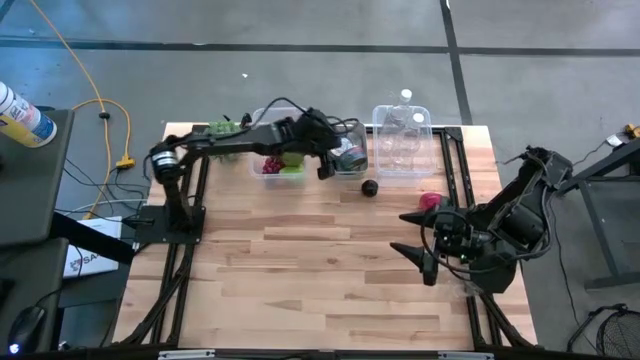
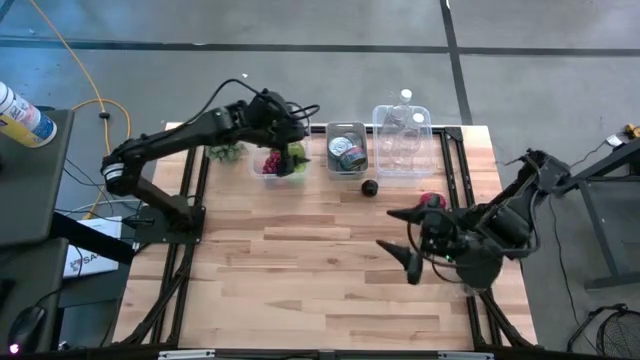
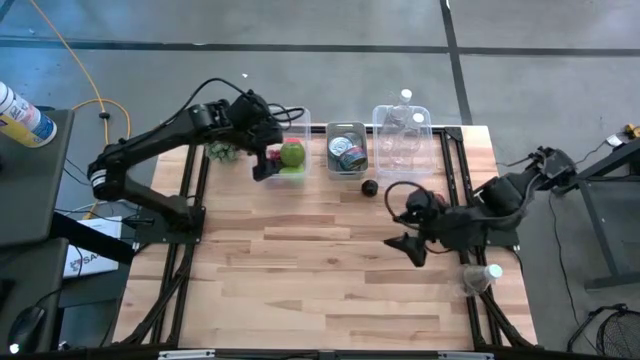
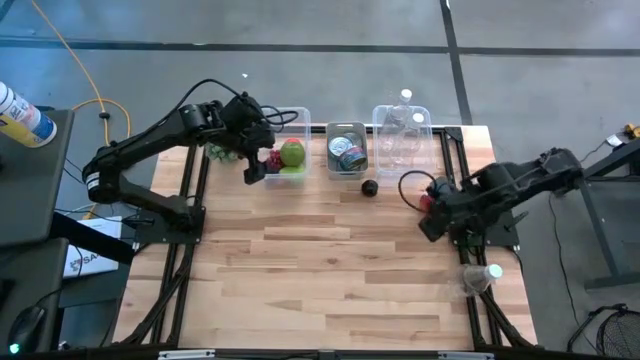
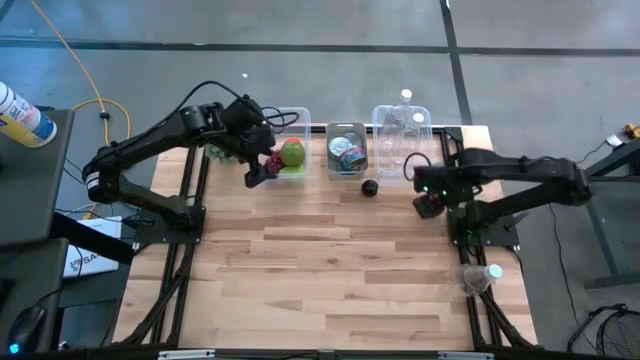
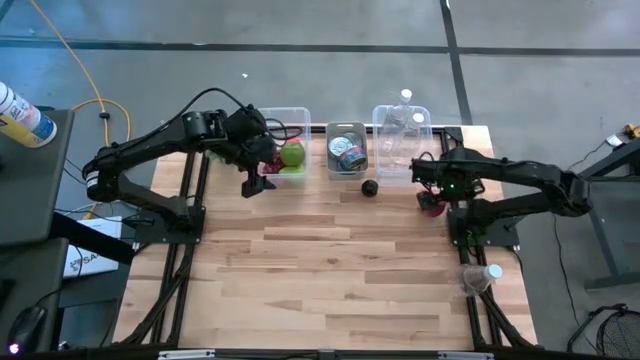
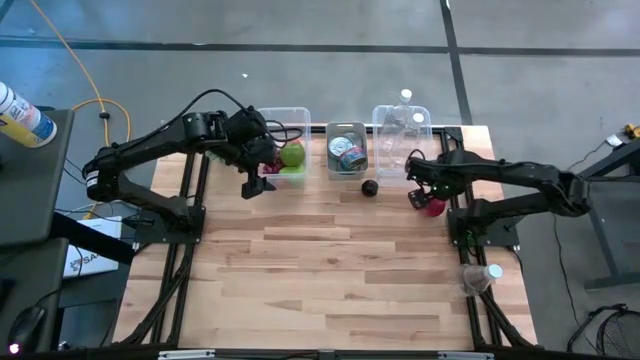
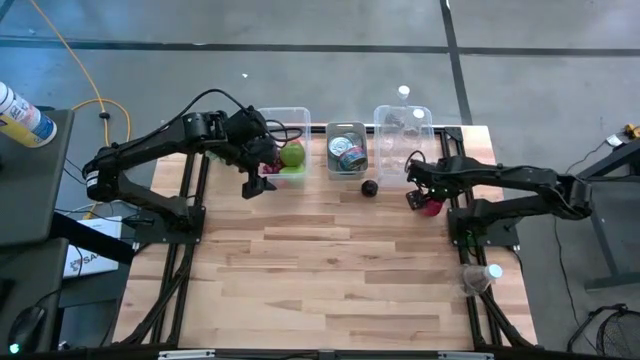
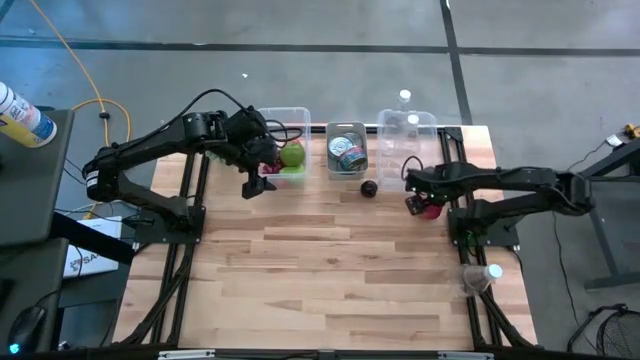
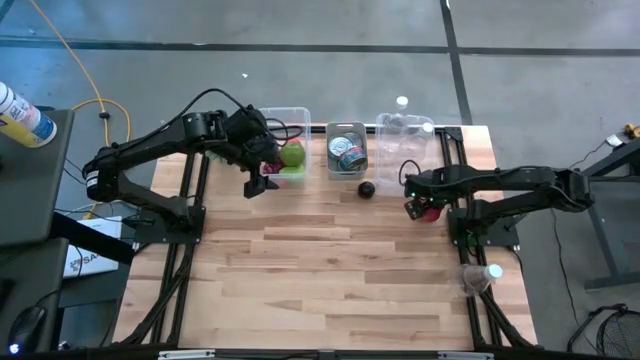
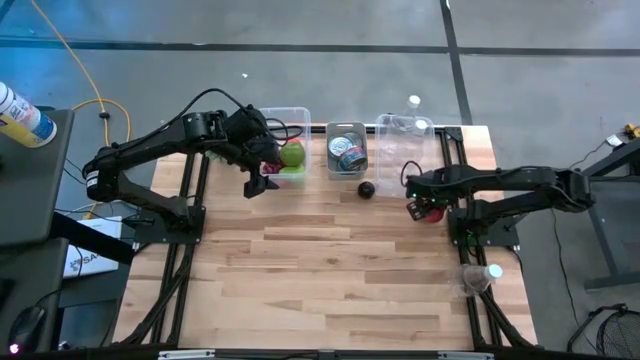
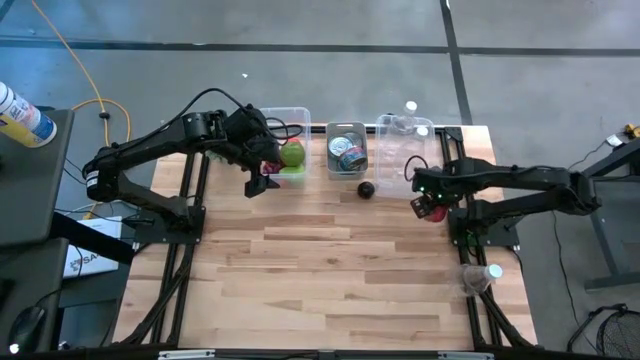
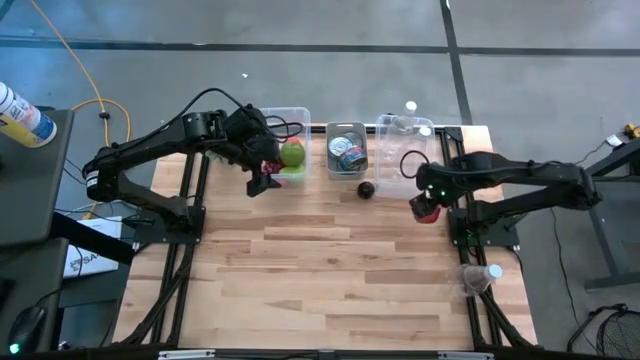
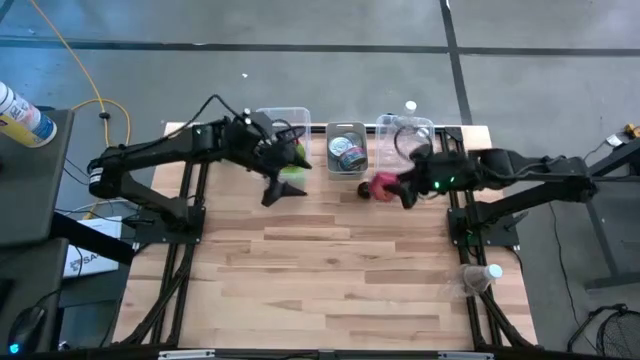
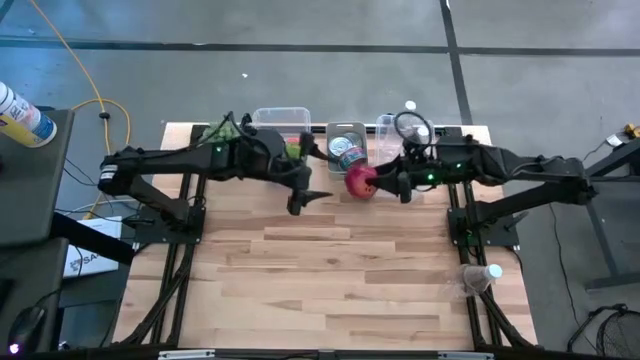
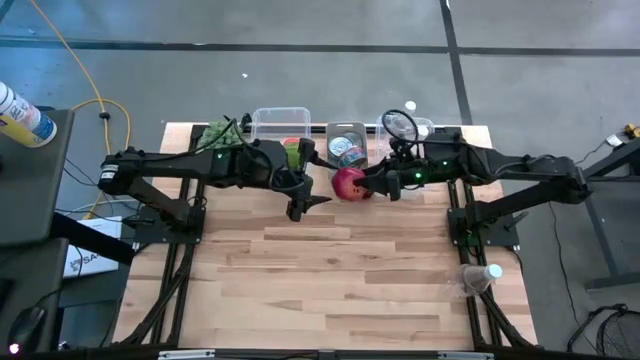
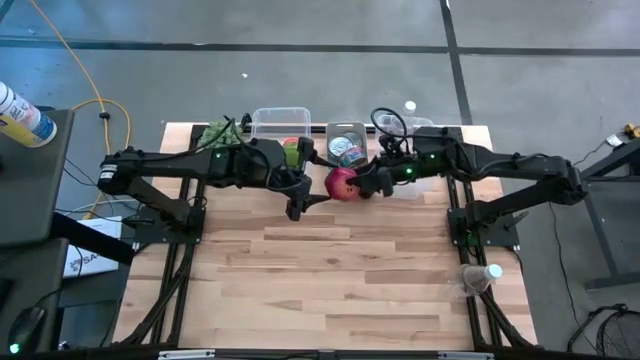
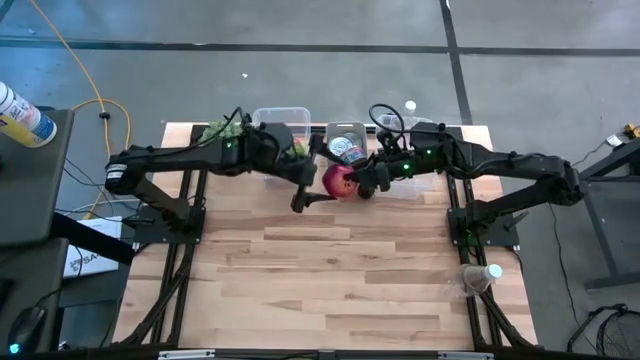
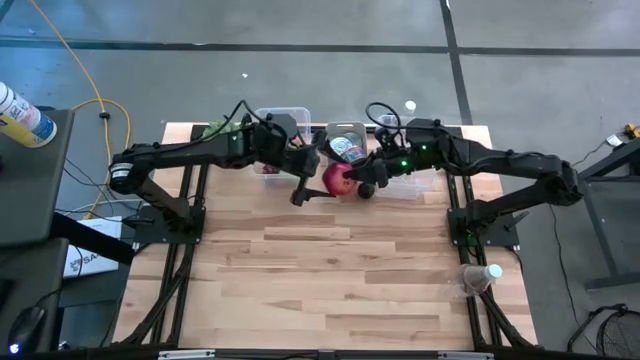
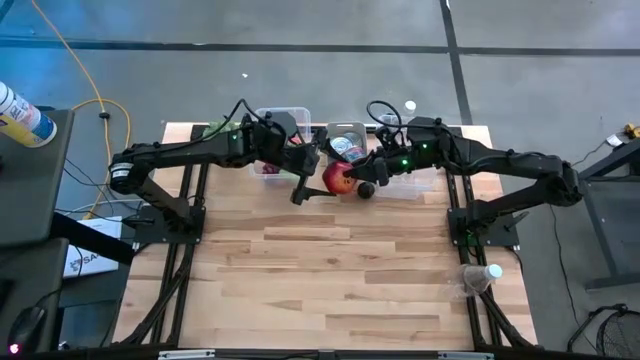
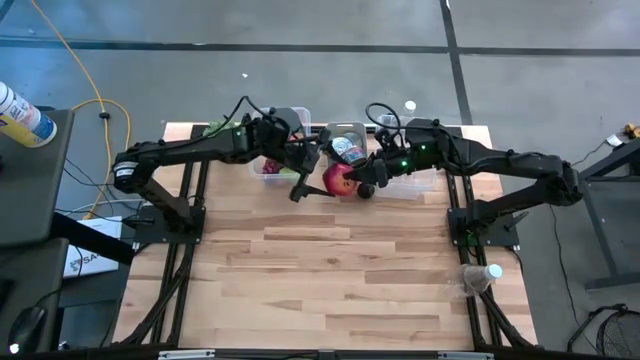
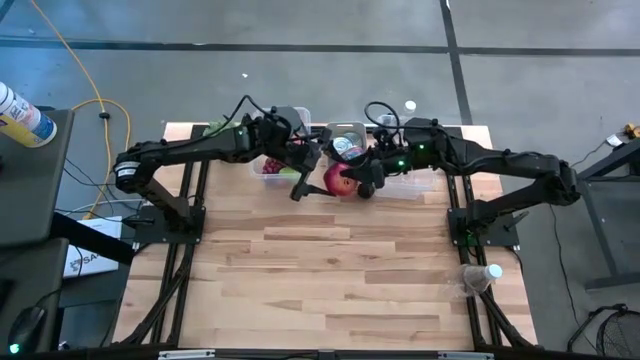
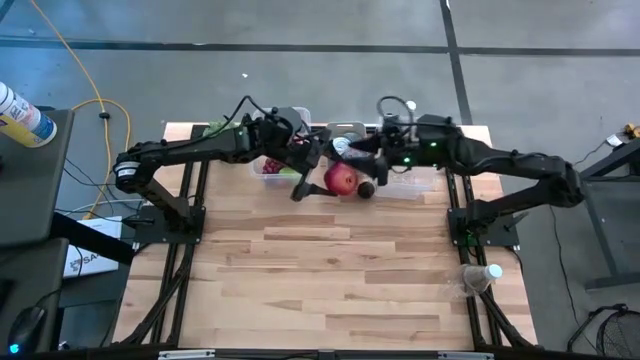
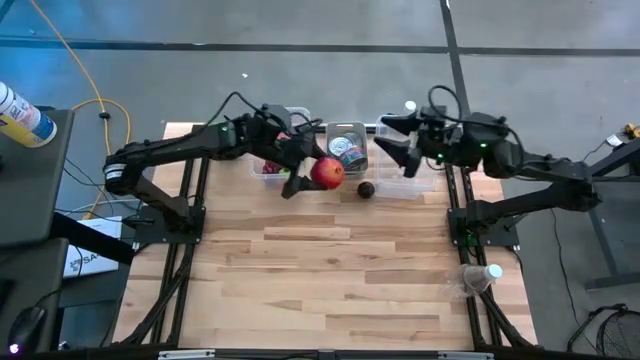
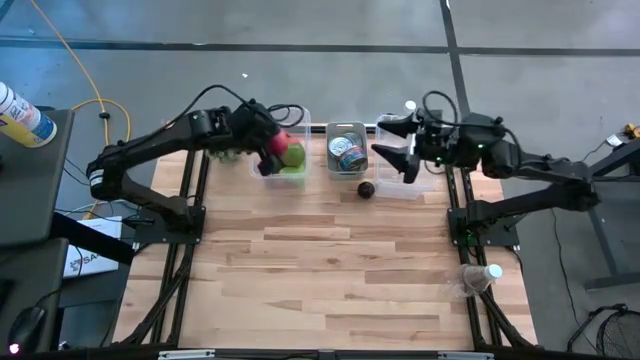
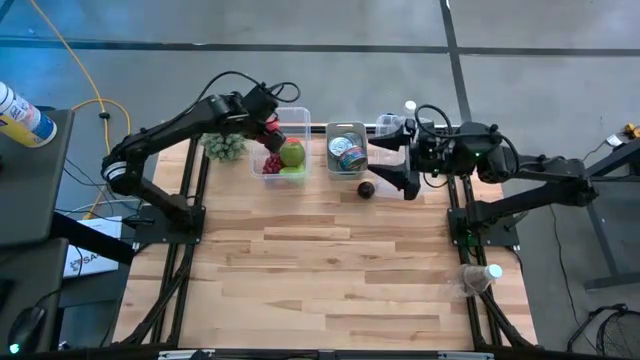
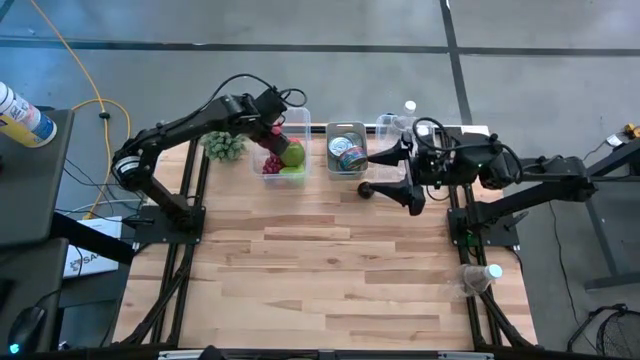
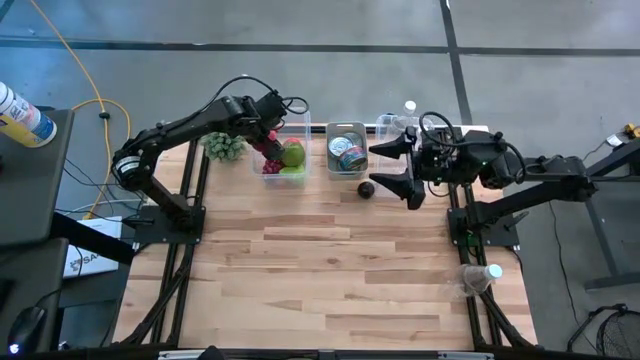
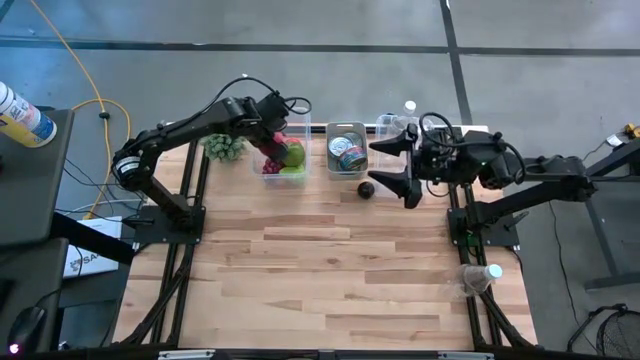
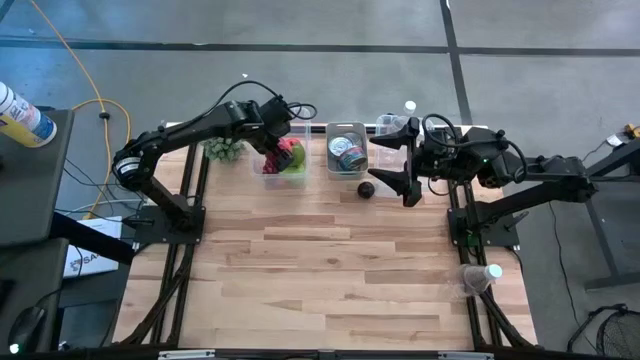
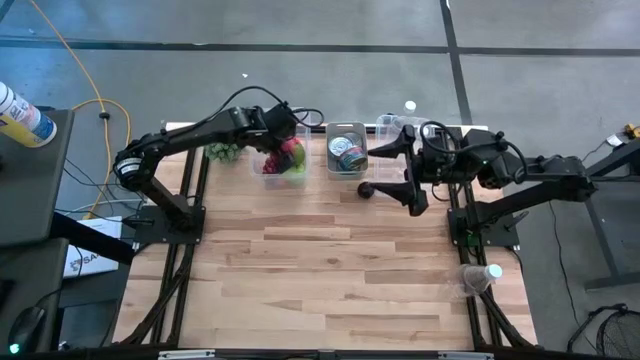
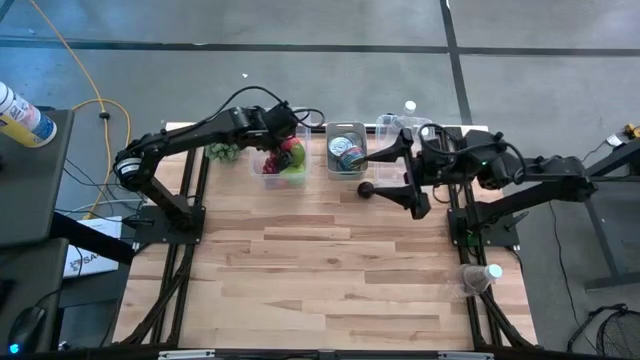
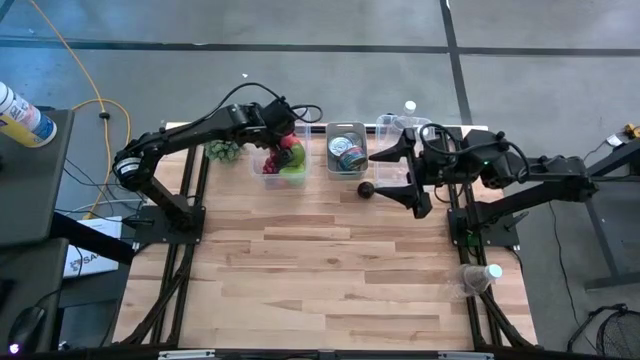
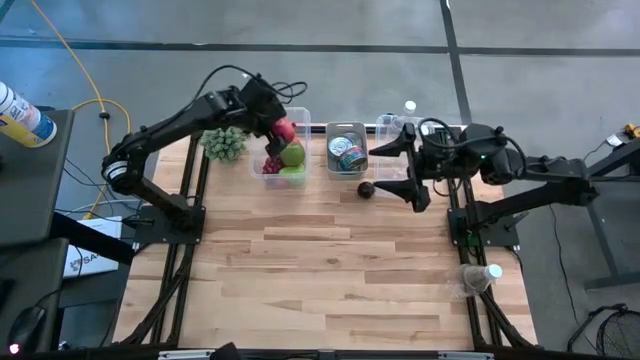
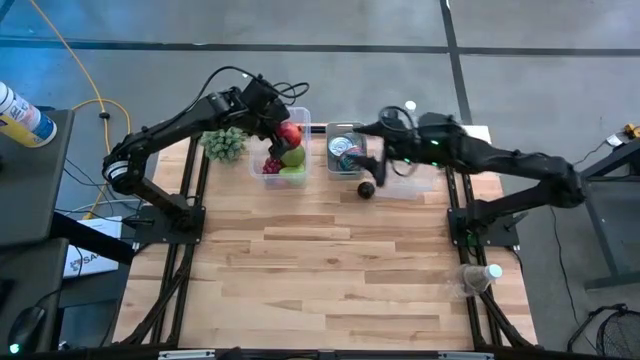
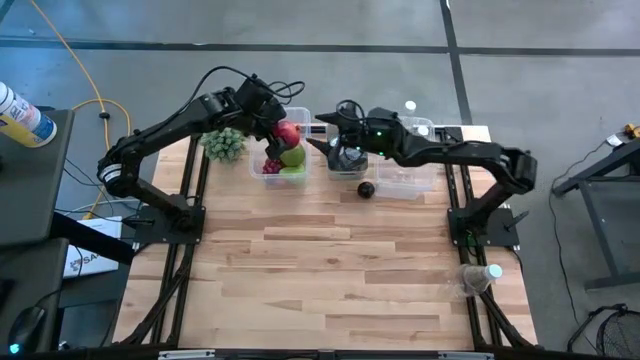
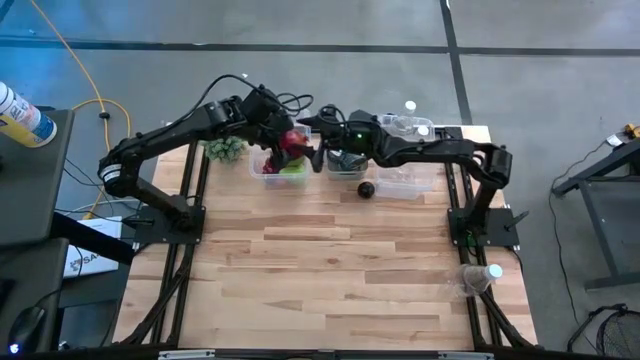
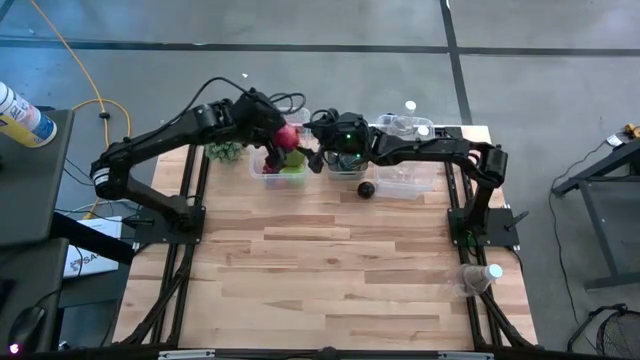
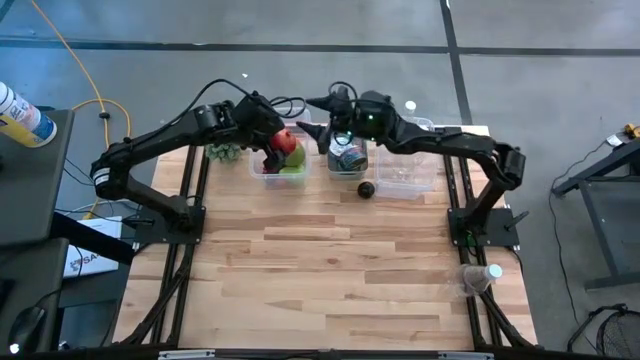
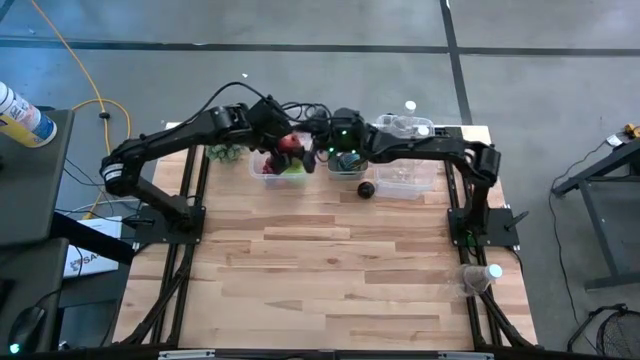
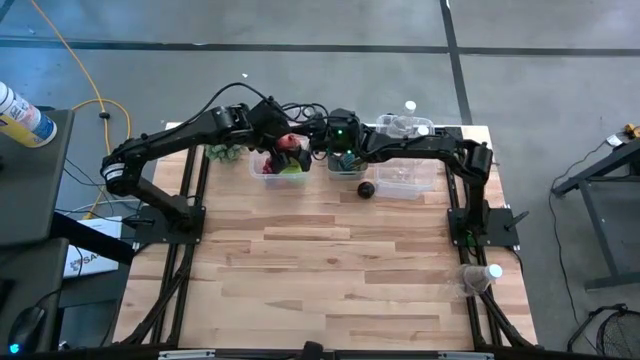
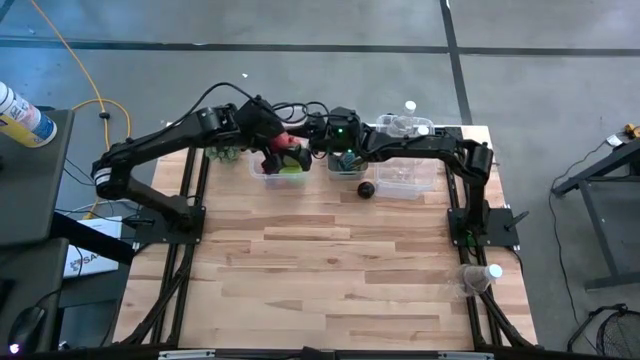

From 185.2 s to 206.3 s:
Task: Pick & Place Food Item
Put the pomegranate into the left transparent bin
